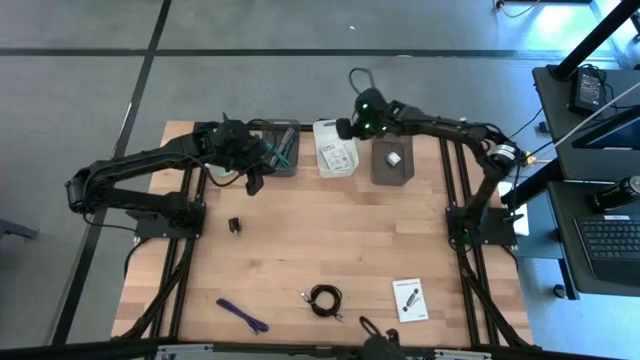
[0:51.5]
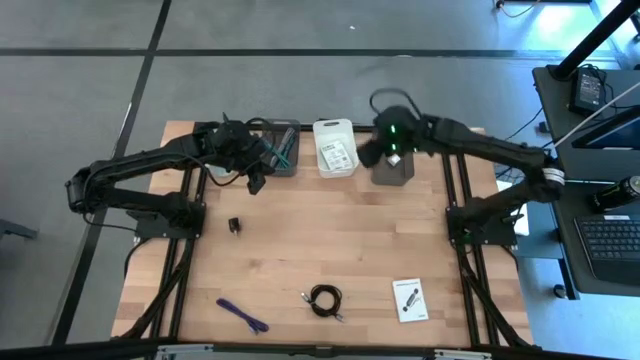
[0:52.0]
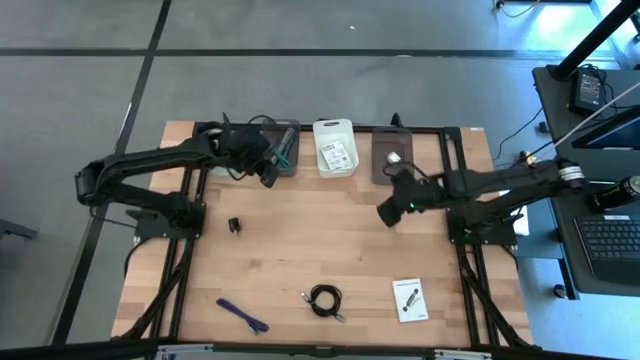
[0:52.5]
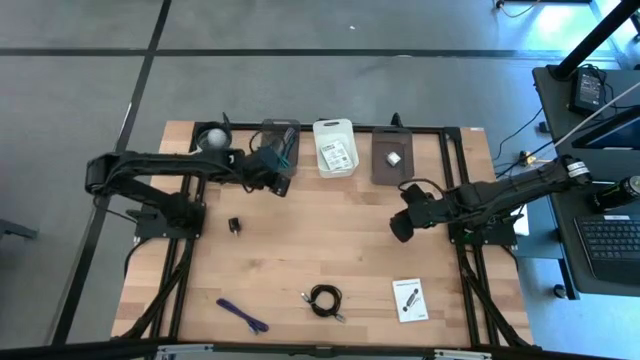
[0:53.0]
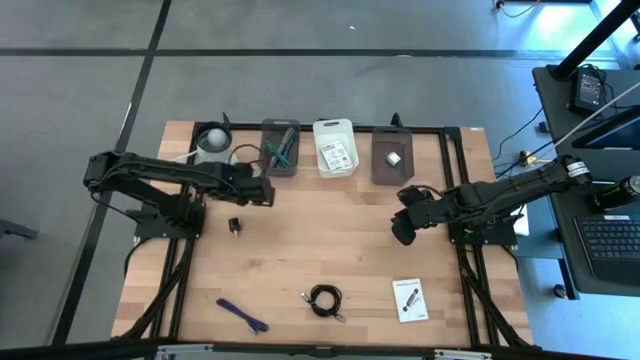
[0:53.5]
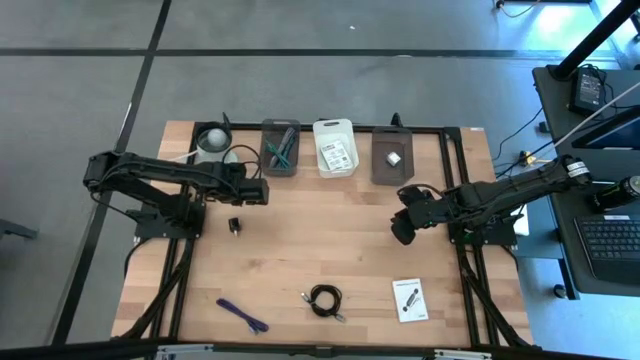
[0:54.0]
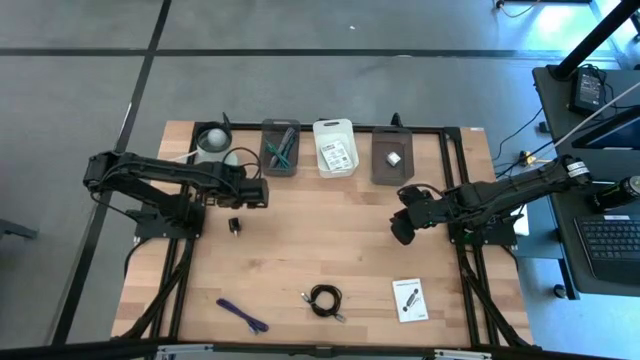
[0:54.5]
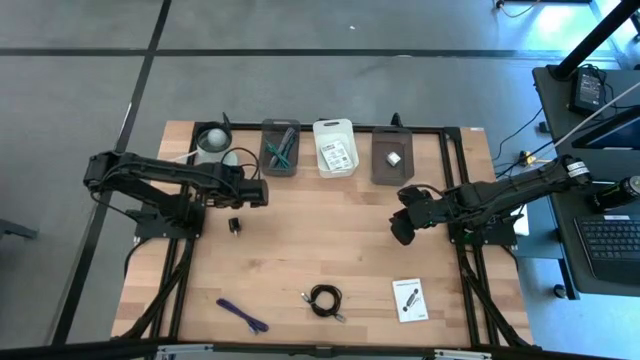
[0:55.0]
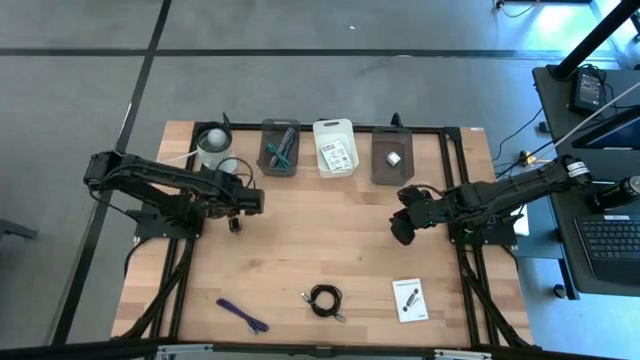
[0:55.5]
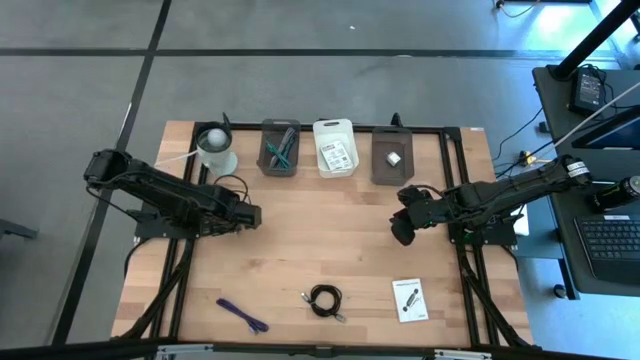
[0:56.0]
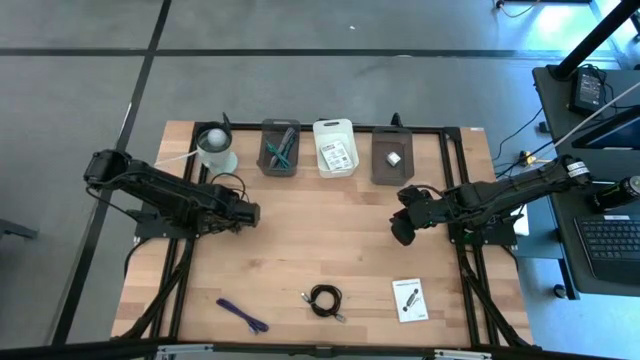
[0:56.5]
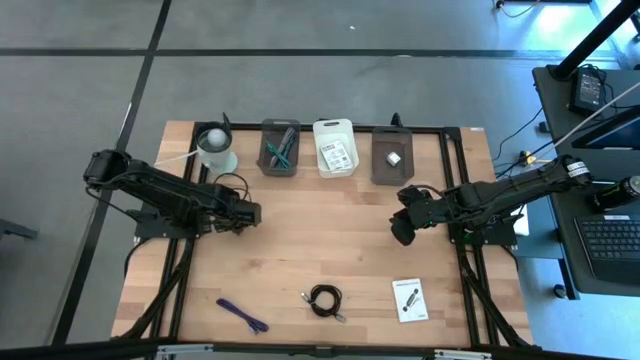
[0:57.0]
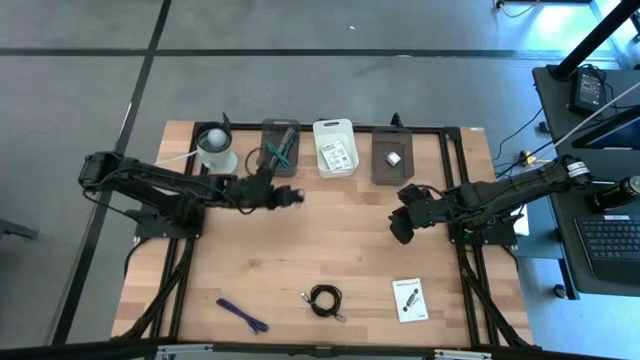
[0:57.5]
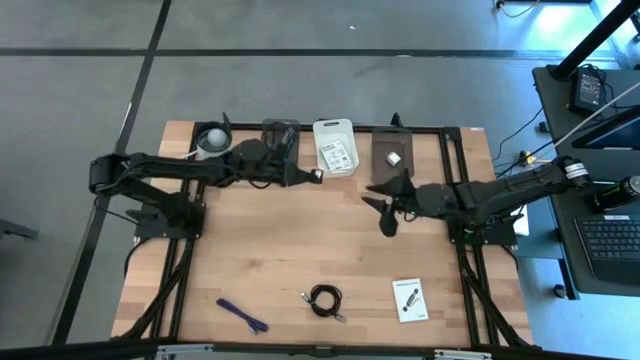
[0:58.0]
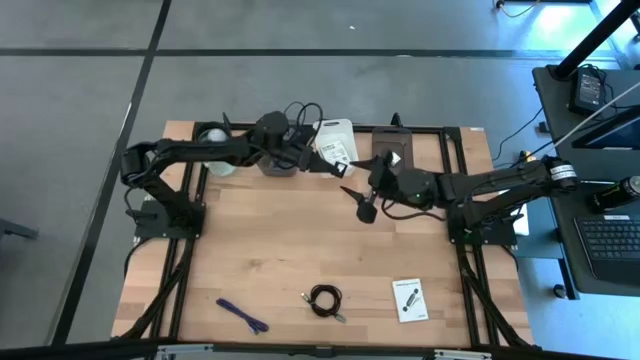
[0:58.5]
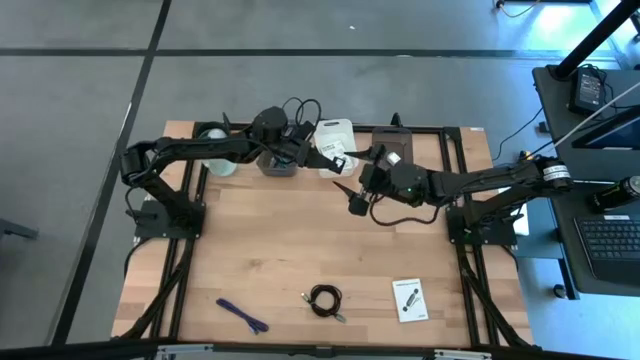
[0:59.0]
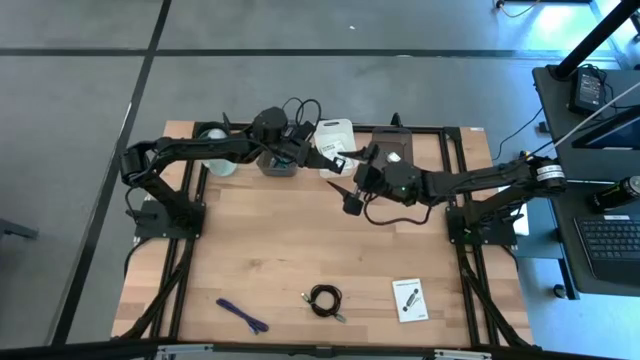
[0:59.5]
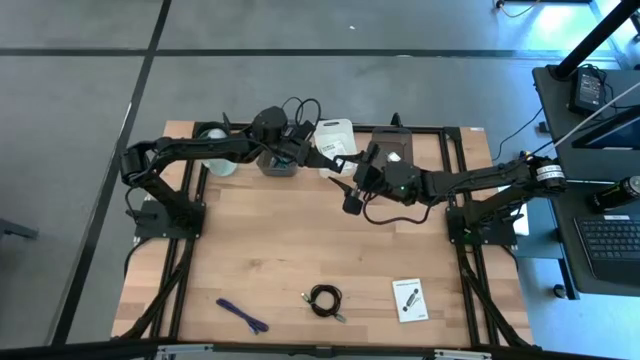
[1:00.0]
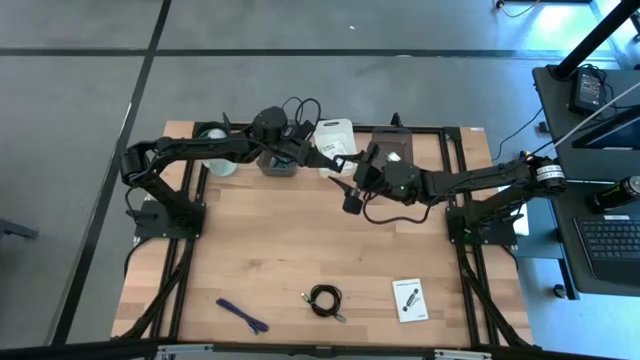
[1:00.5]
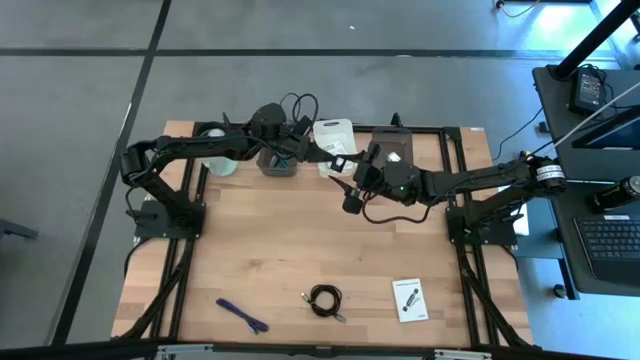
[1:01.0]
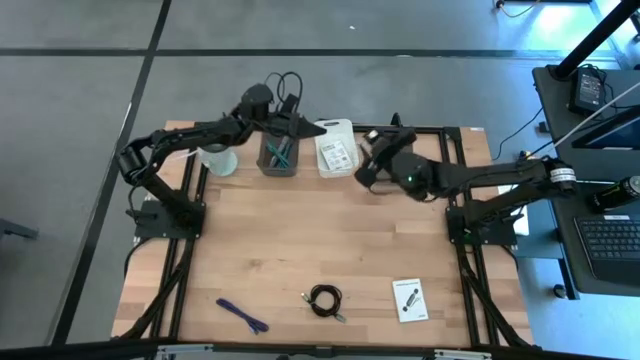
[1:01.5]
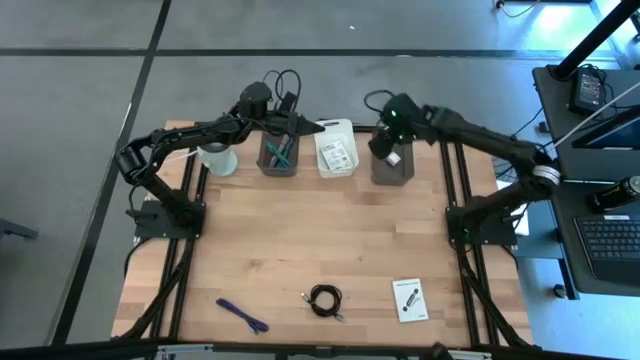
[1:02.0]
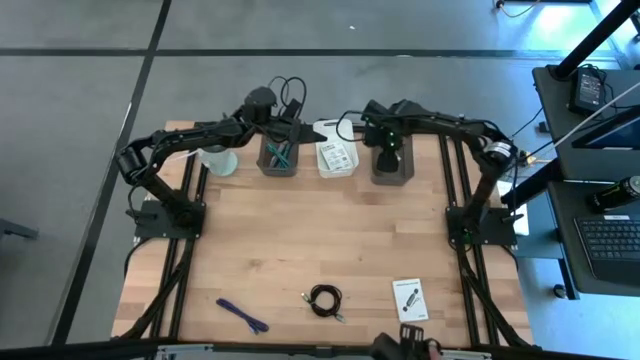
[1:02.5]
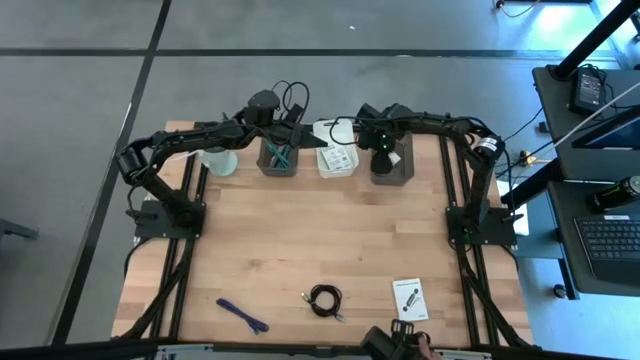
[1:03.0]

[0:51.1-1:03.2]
Task: Pick and place items into bin
Put the black charger adapter into the right black bin

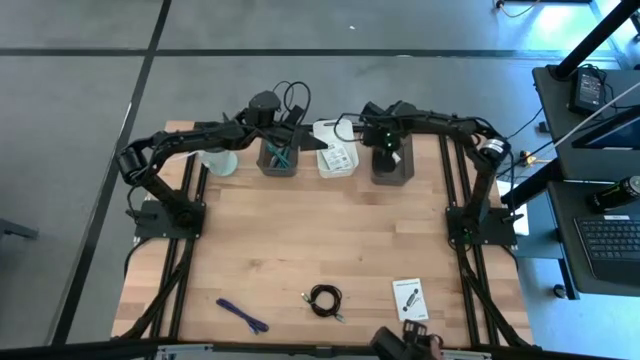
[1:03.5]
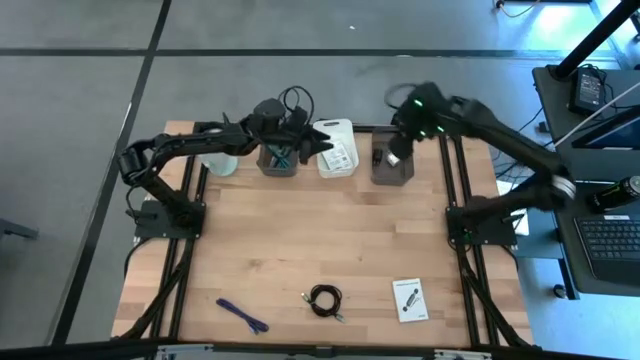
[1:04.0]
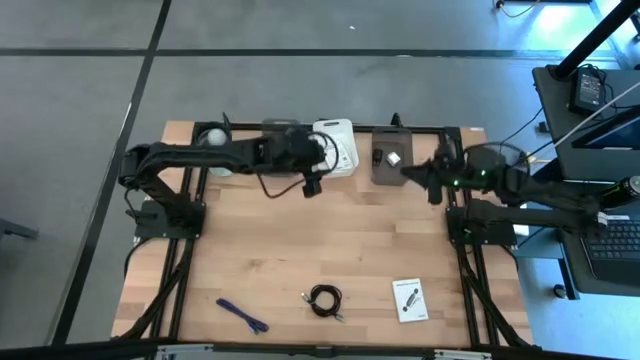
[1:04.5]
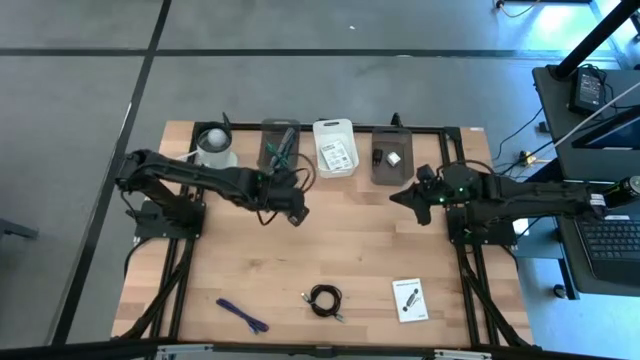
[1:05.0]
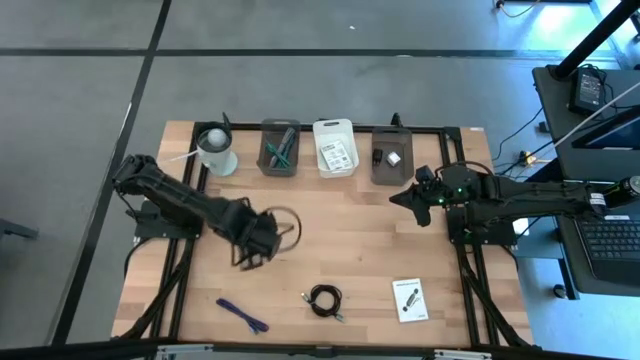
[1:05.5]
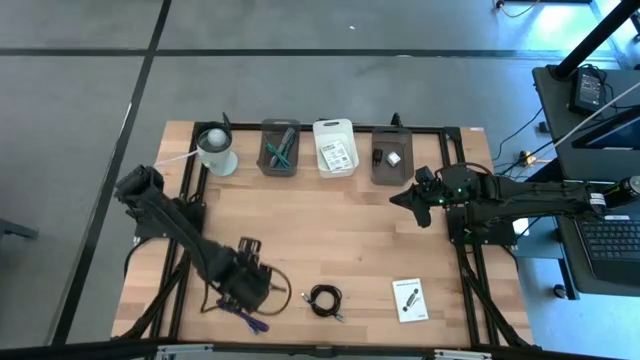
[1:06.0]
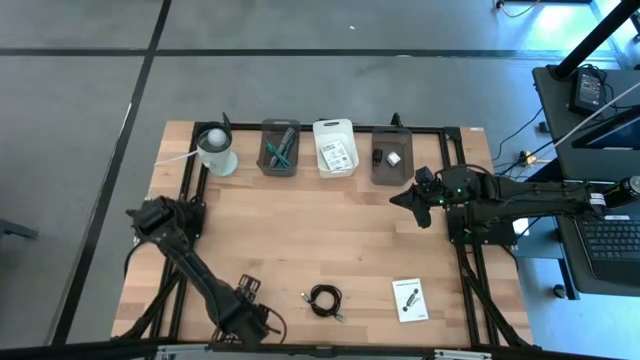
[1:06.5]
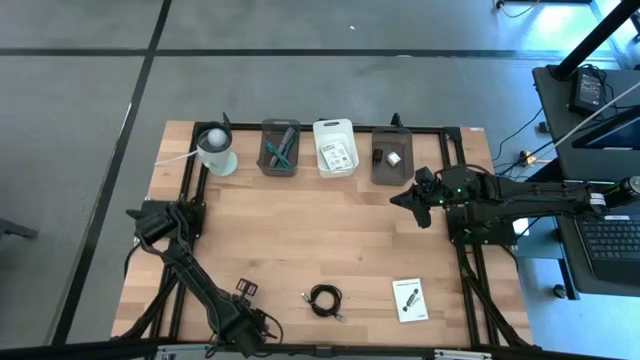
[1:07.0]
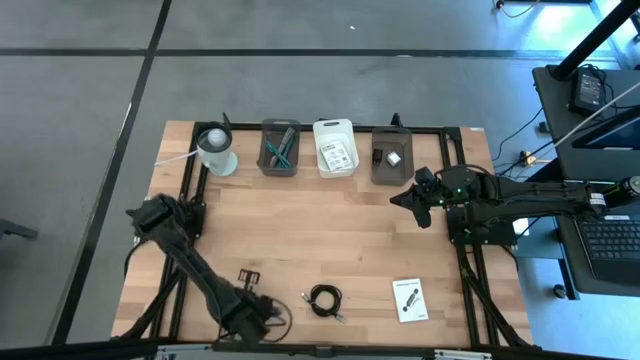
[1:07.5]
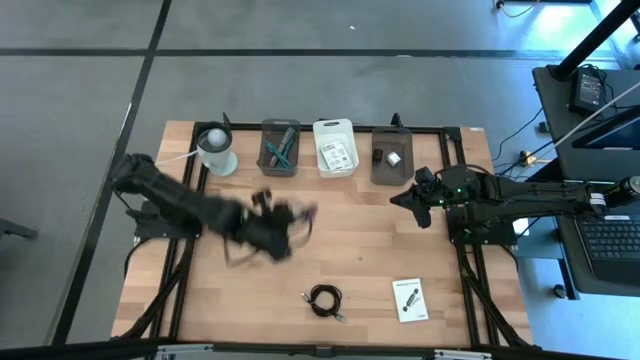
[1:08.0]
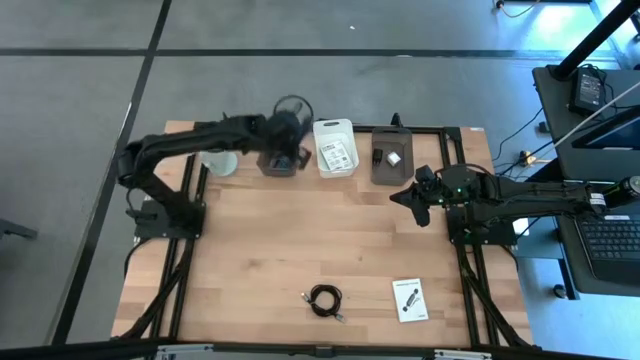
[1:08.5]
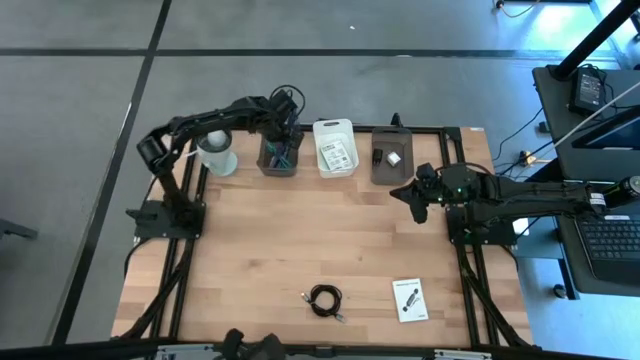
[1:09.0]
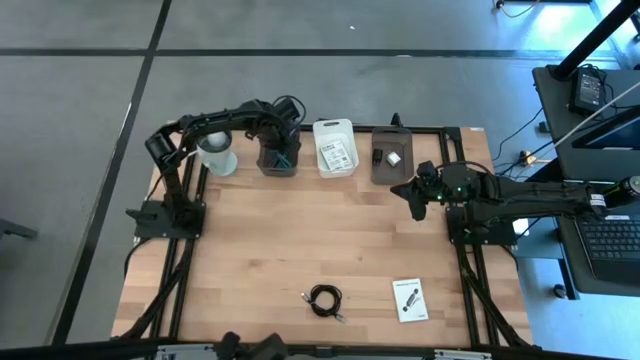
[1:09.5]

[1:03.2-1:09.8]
Put the dark blue charger cable into the left black bin

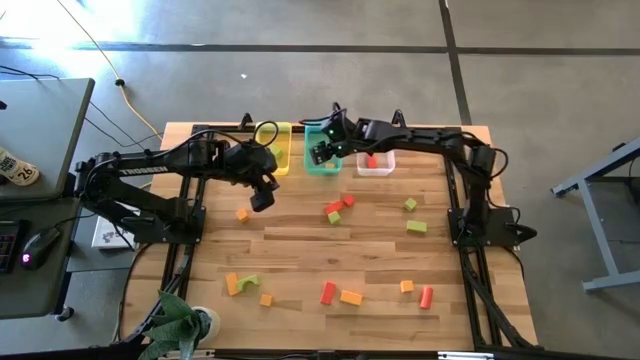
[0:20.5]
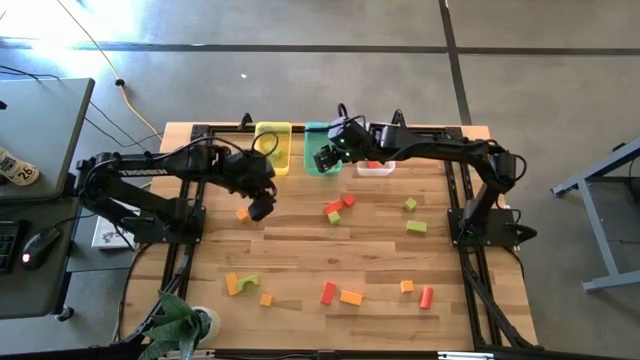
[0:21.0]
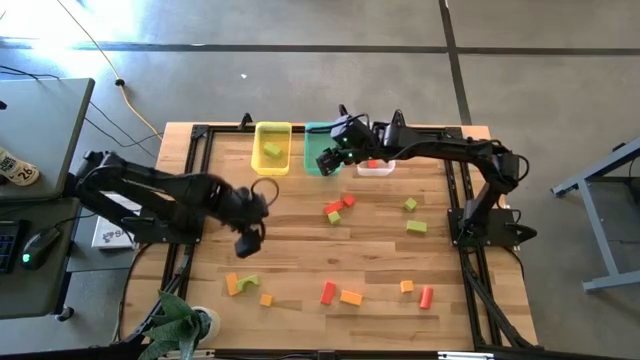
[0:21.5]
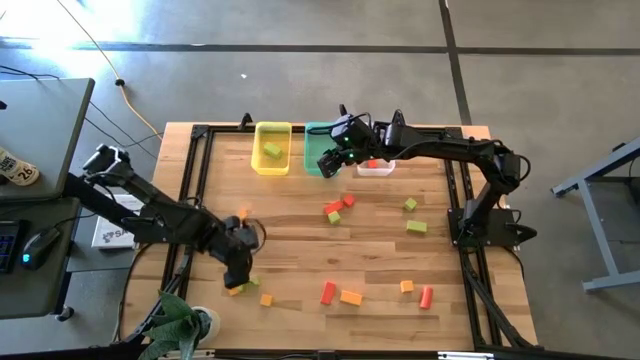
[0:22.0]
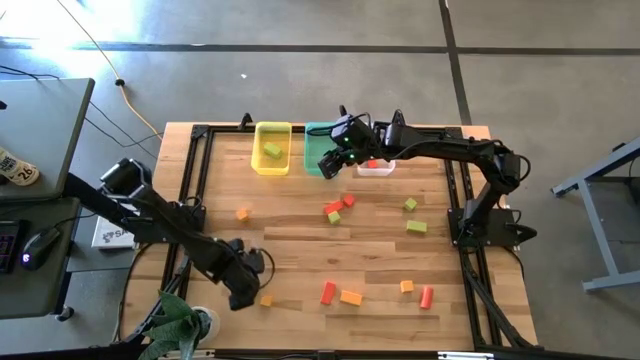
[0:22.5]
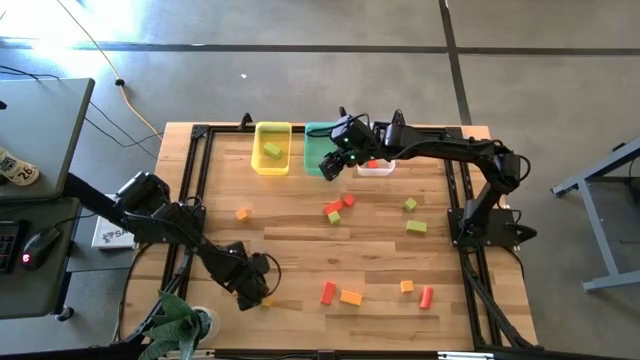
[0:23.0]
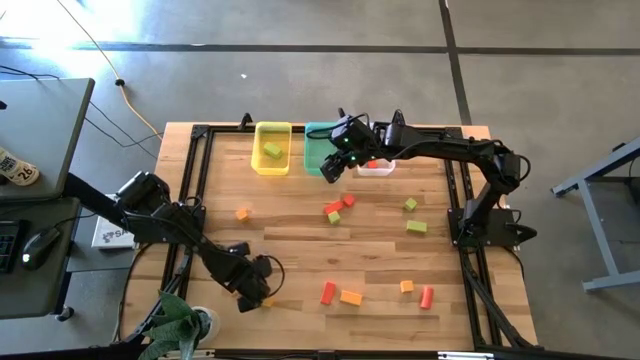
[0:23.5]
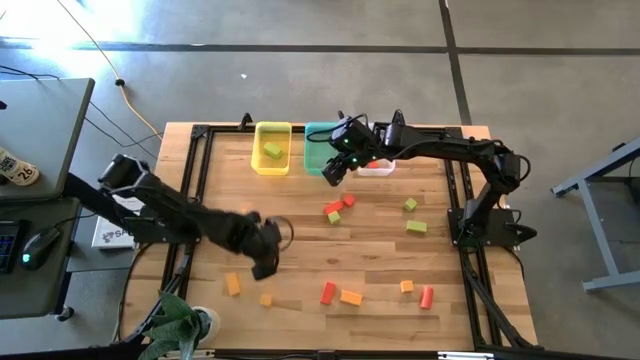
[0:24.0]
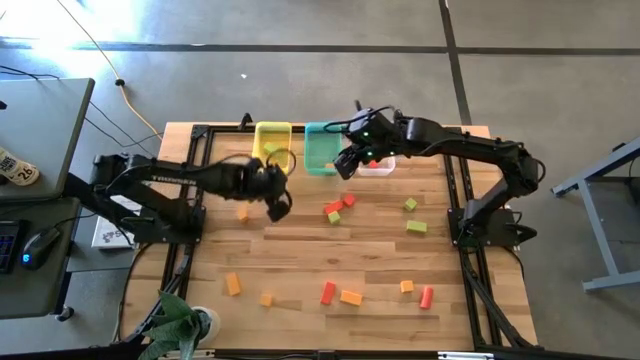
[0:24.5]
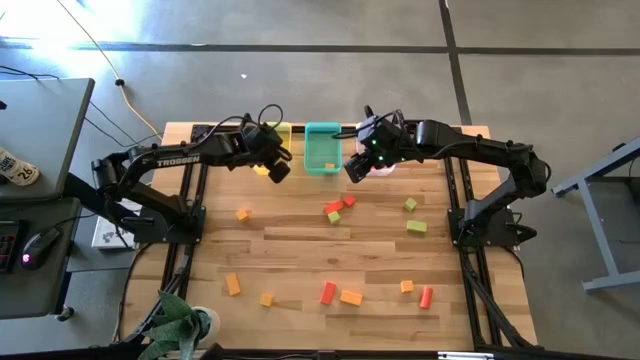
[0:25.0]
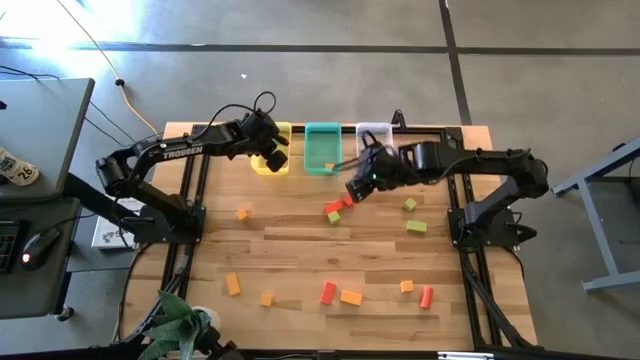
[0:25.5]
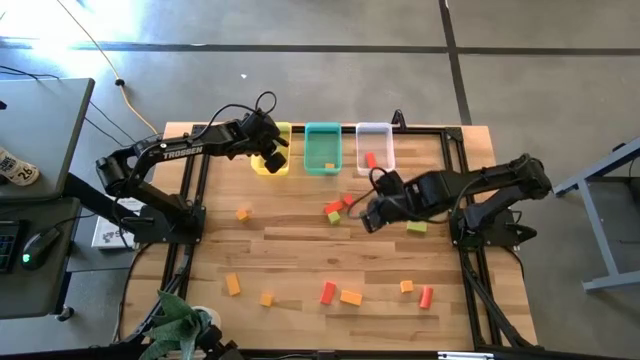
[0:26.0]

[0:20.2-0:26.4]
Task: Sort & place blocks by color
Put the green block into the yellow bin
